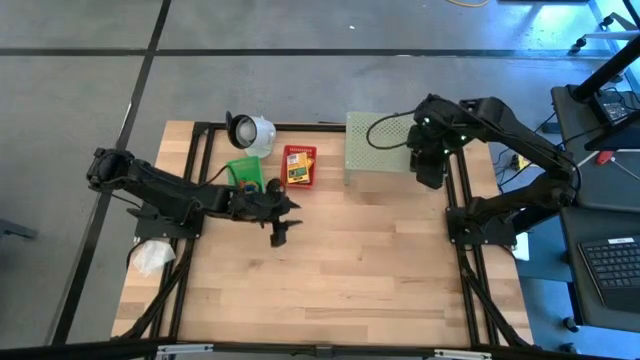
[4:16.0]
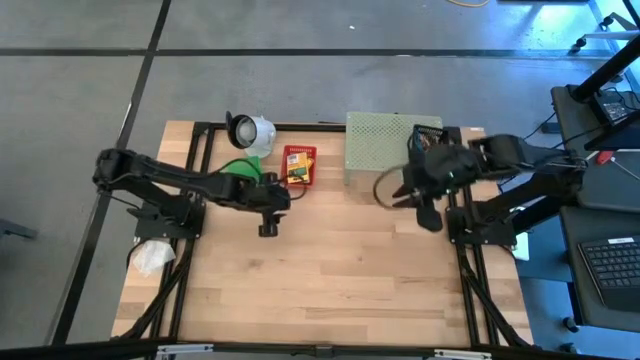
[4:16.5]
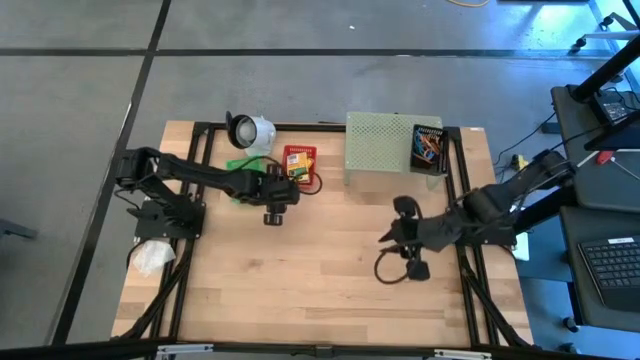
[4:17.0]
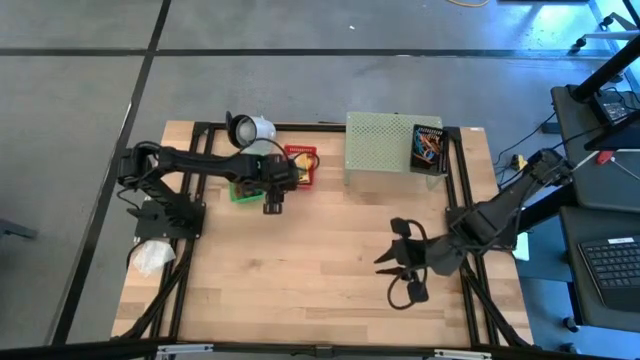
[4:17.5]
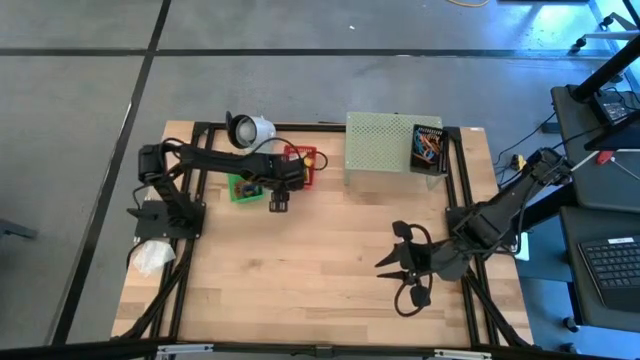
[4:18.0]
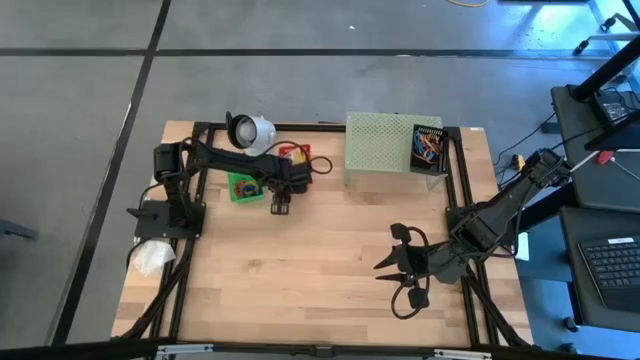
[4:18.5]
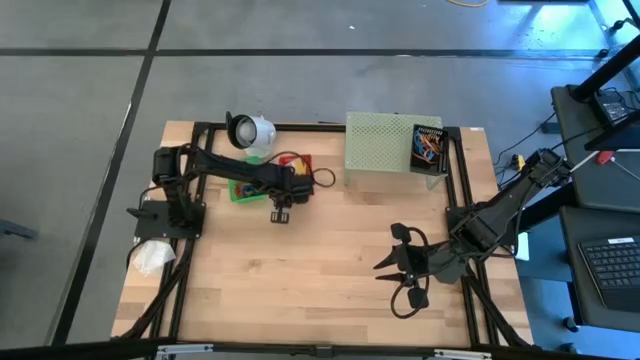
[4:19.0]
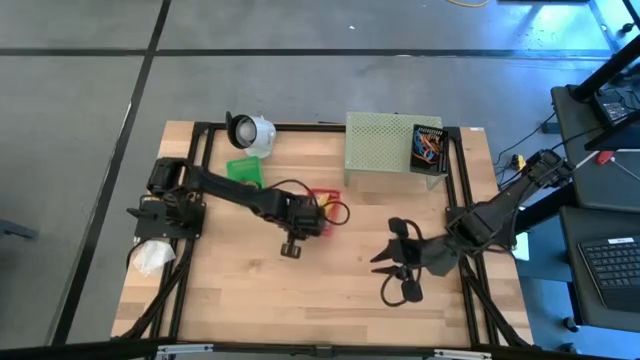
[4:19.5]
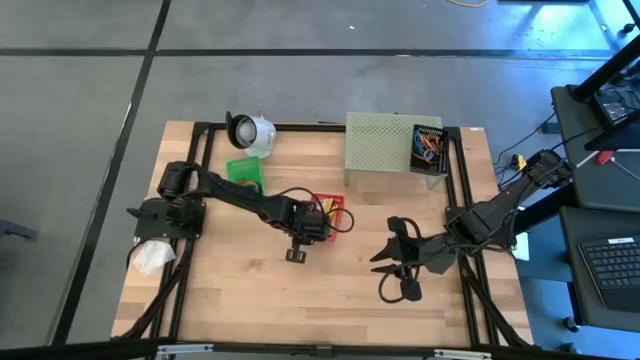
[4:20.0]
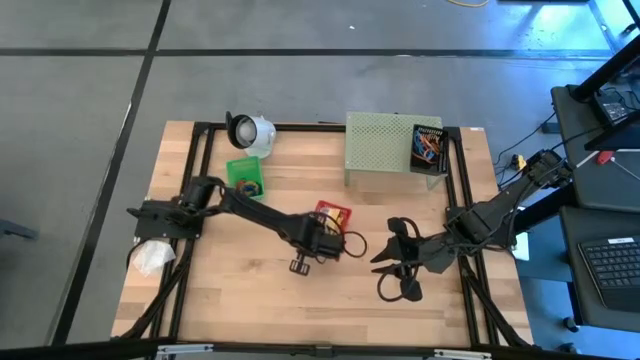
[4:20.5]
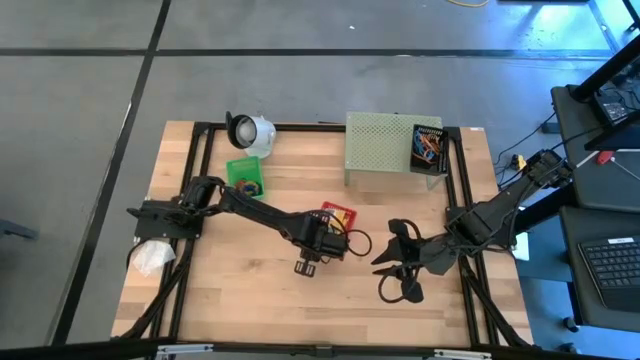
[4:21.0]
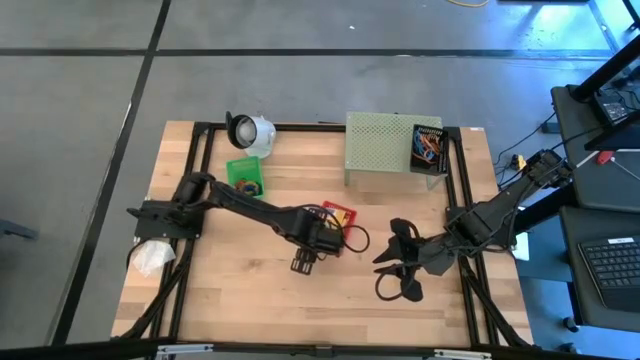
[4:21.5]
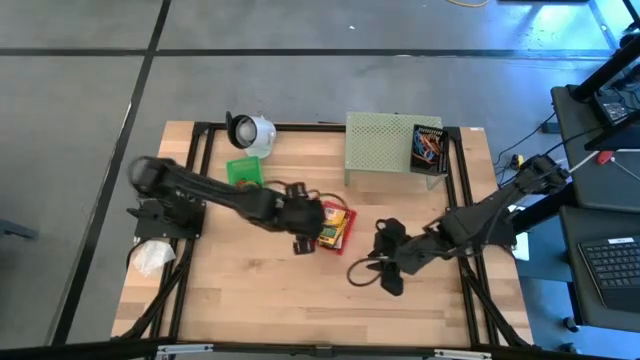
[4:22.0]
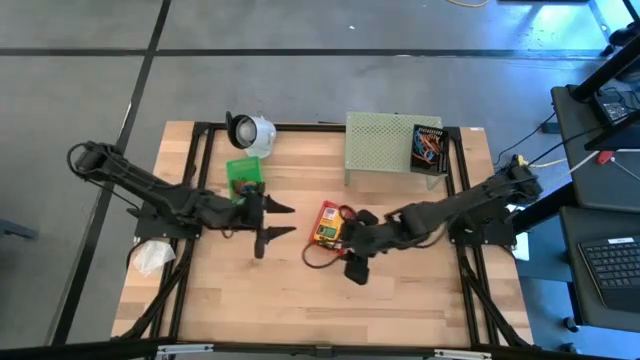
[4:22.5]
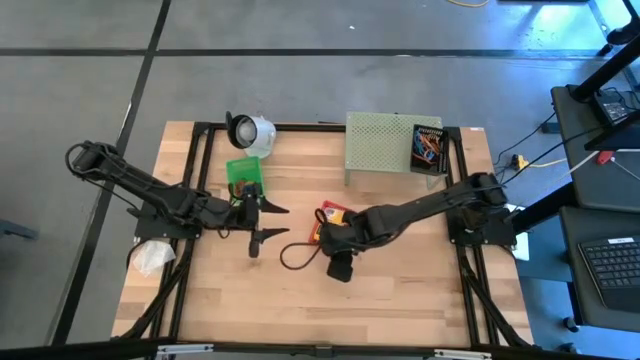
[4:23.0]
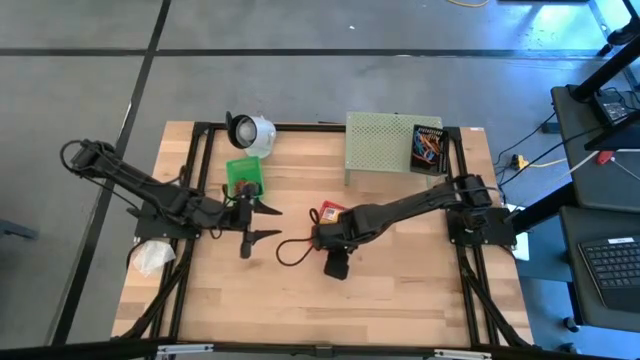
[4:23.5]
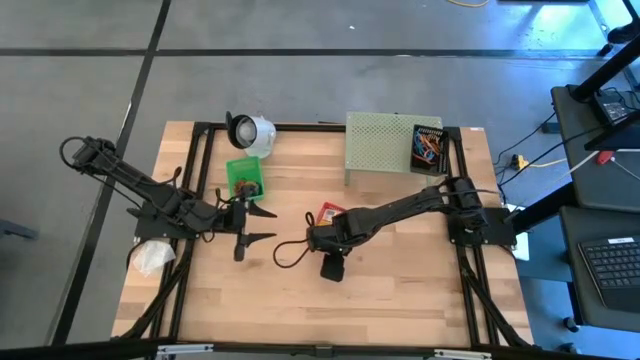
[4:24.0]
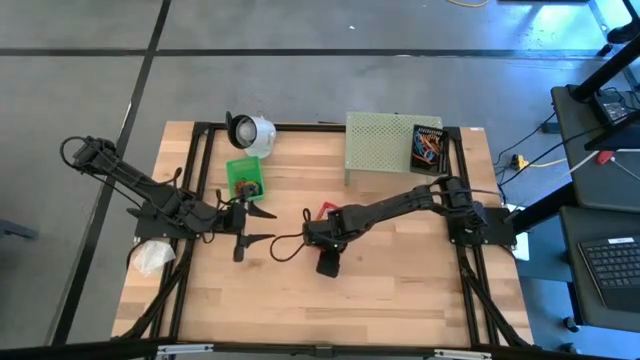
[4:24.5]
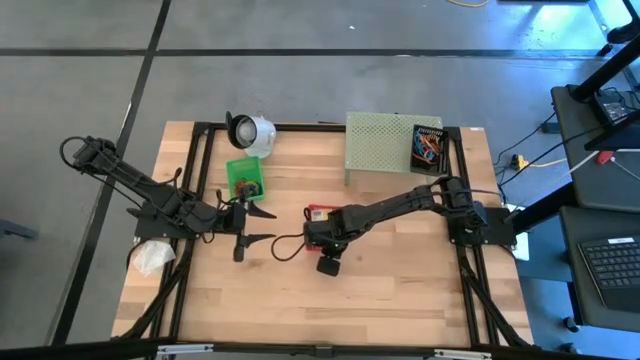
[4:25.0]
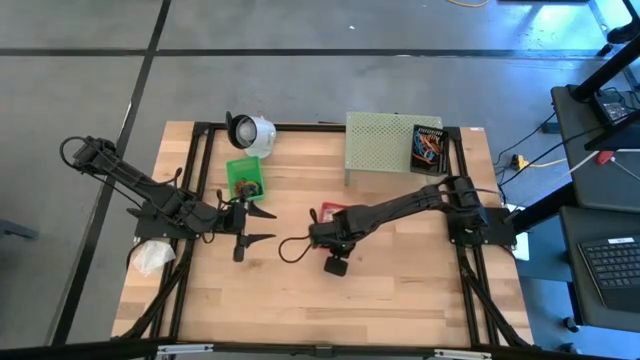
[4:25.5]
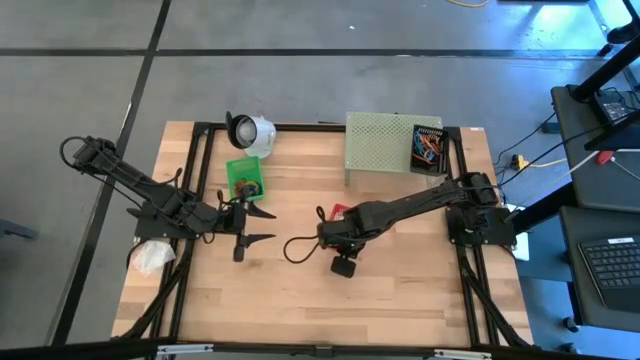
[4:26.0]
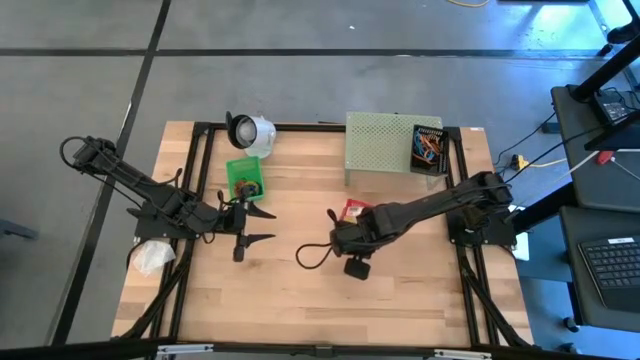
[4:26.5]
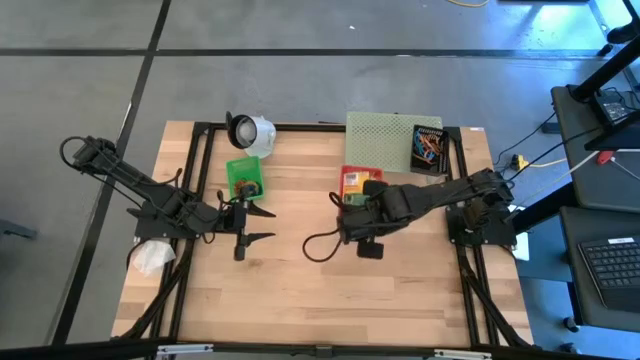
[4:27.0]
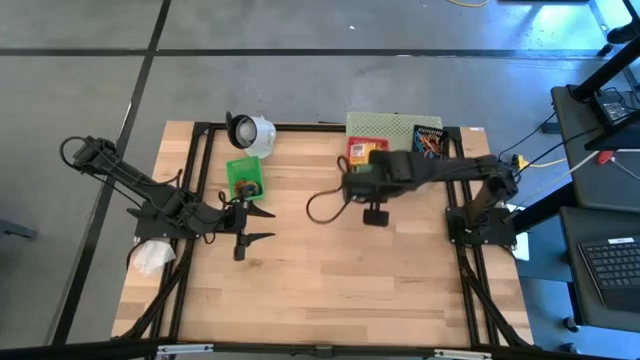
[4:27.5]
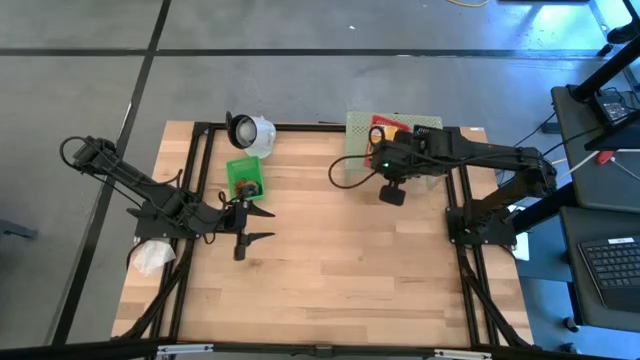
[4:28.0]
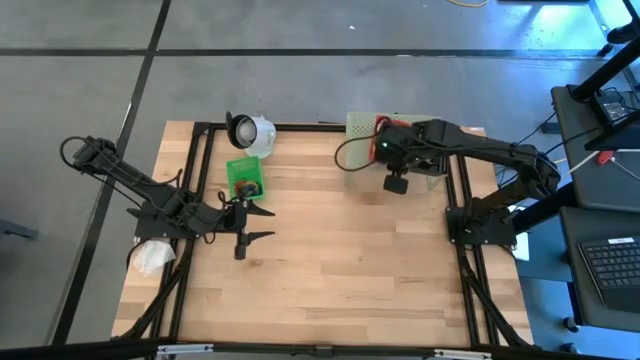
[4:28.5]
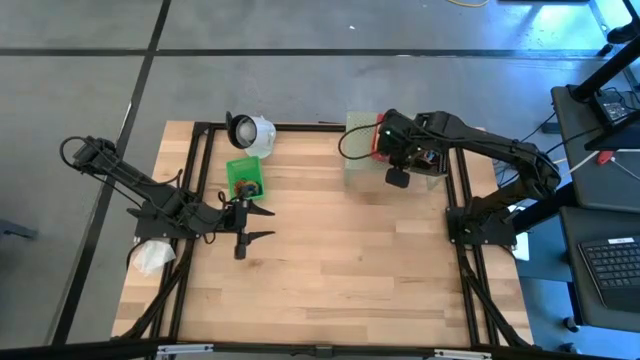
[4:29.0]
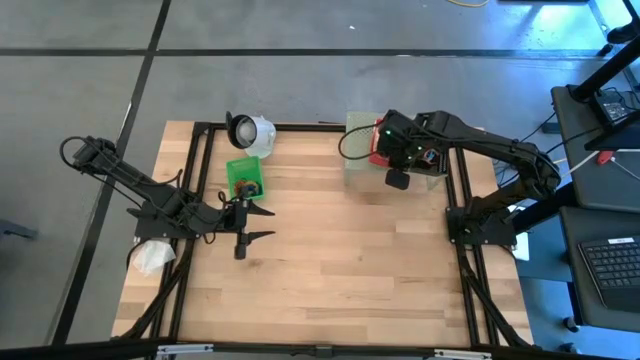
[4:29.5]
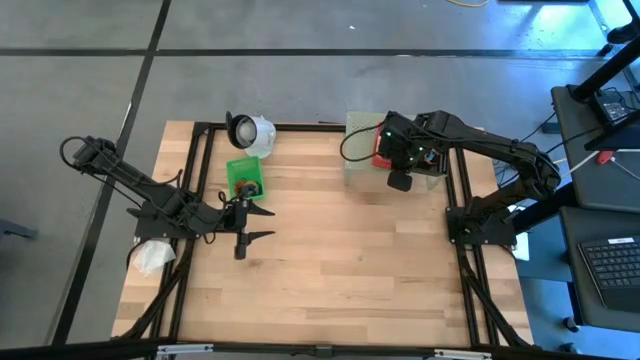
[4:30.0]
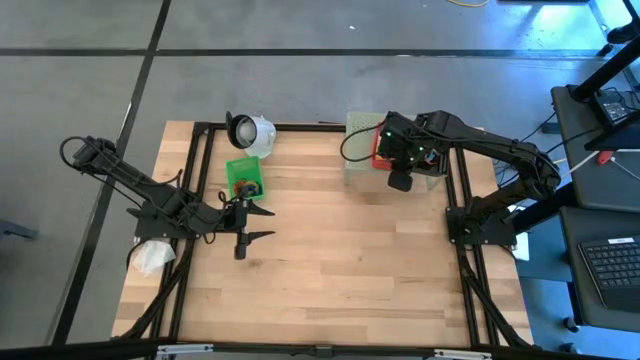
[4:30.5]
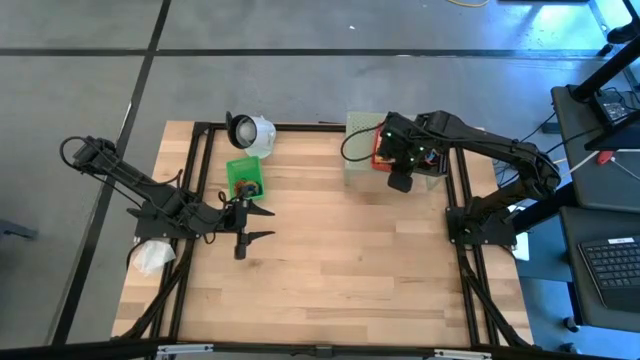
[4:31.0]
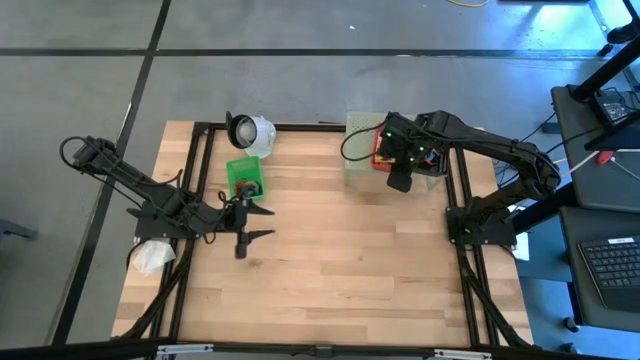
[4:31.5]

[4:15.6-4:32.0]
Task: Pick & Place Office Desk Supplies
Put the red basket on the shelf

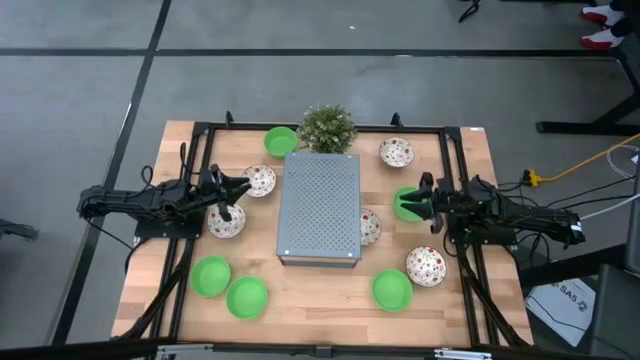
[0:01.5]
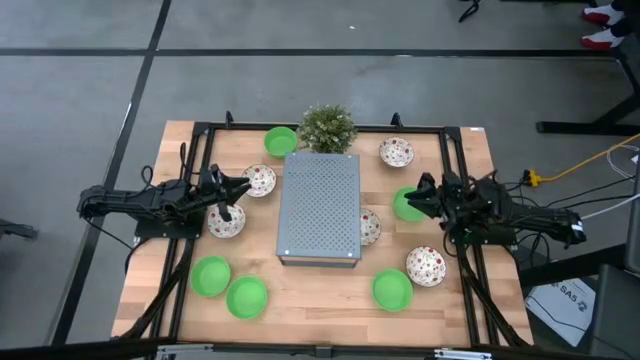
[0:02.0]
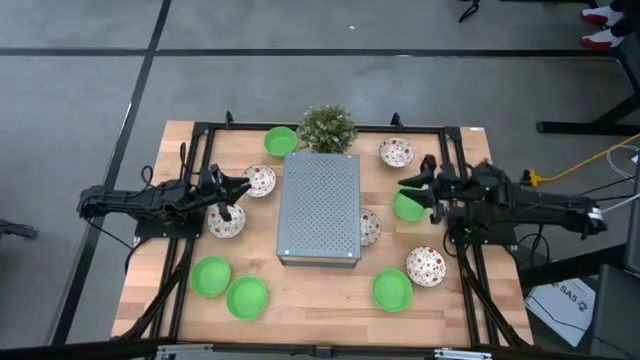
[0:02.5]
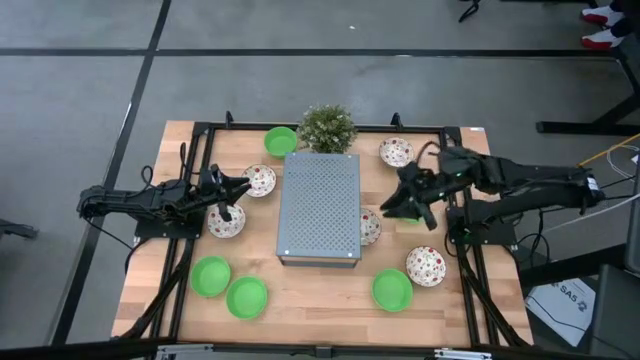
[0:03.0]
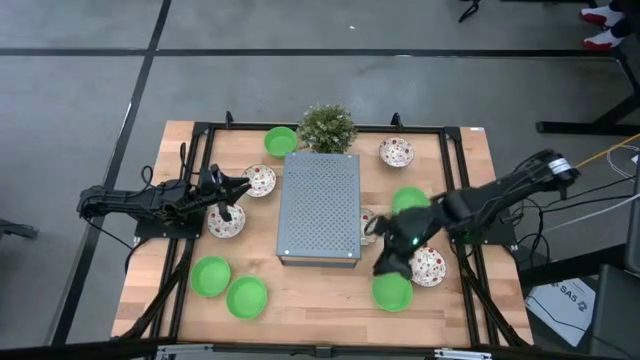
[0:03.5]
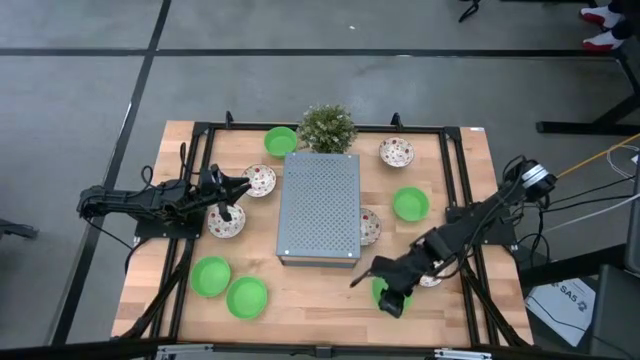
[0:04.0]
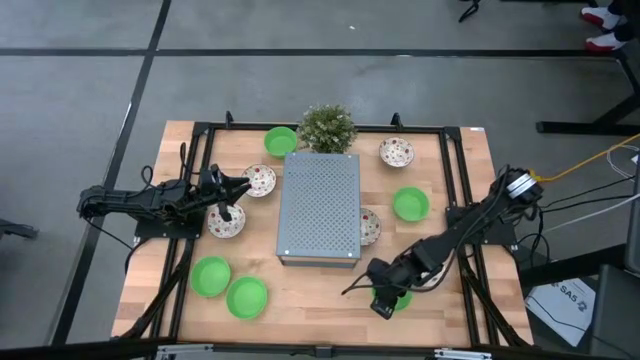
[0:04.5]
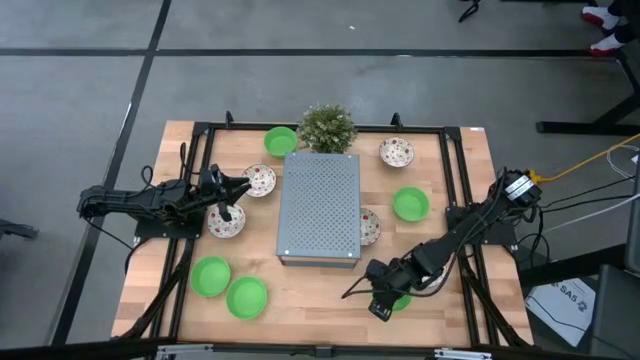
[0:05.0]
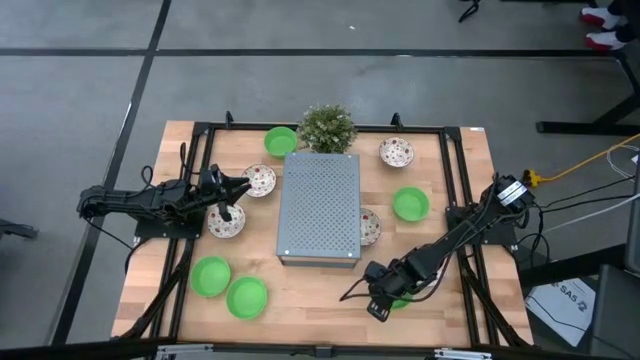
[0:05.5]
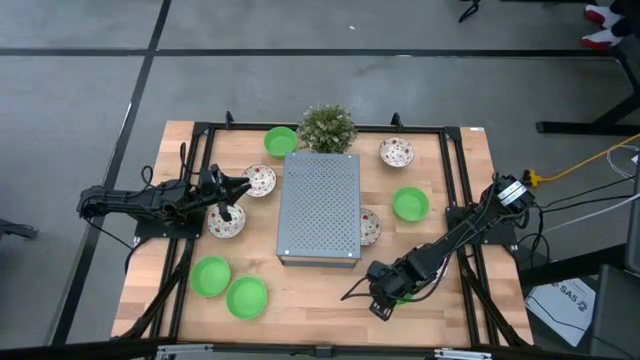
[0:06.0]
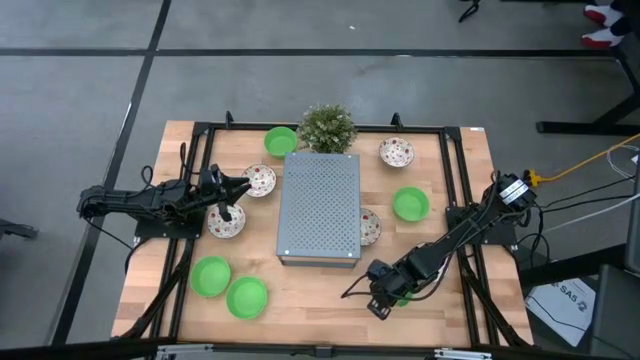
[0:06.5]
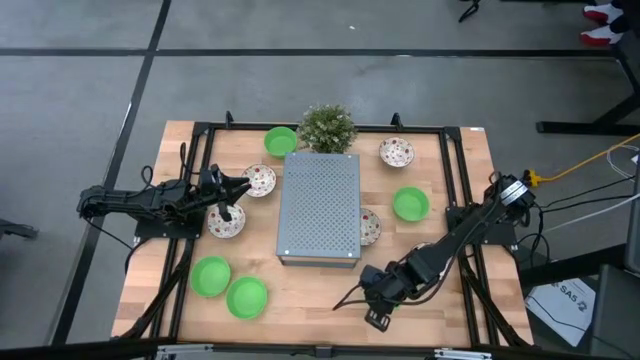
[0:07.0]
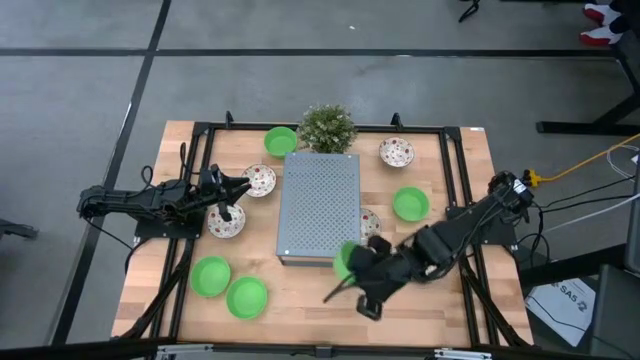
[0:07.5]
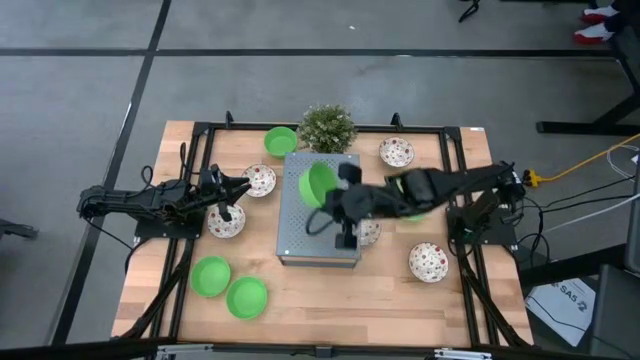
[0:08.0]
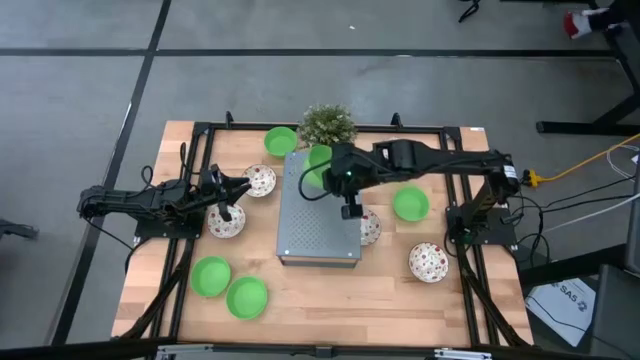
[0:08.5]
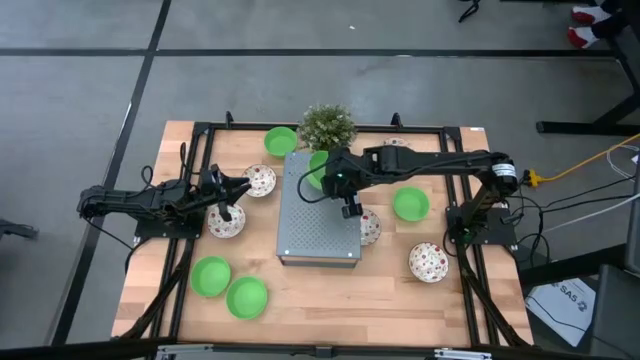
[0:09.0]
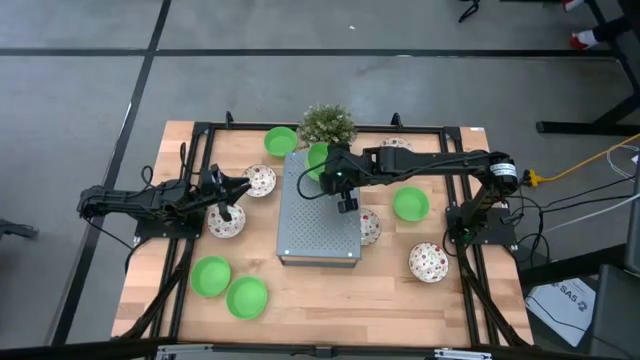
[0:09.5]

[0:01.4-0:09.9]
Task: Pick & Place Mini bowls
Put the green bowl on the shelf
